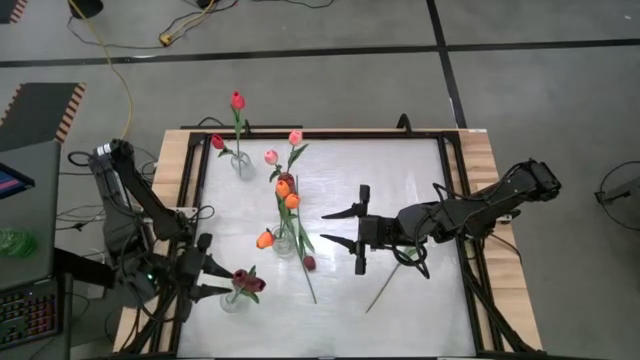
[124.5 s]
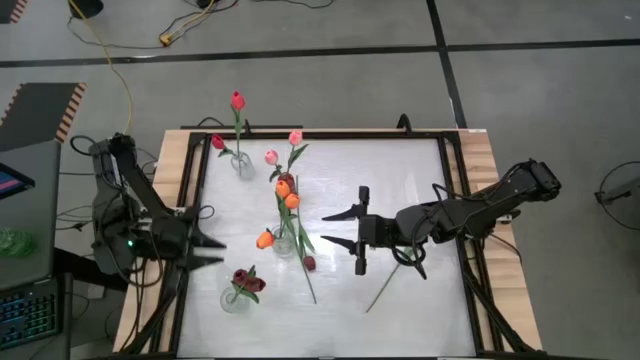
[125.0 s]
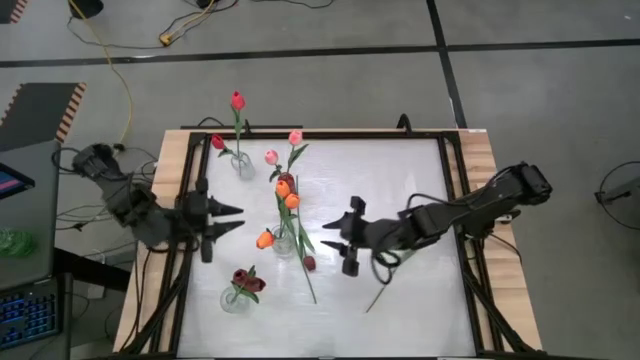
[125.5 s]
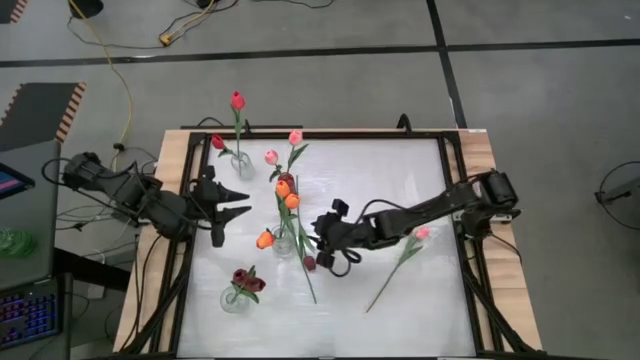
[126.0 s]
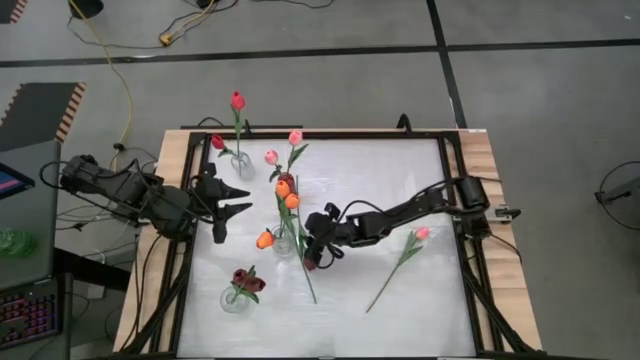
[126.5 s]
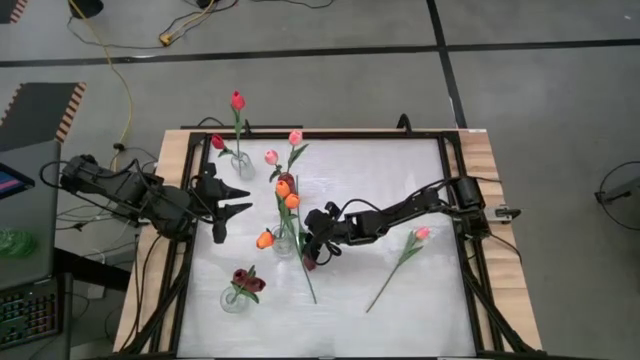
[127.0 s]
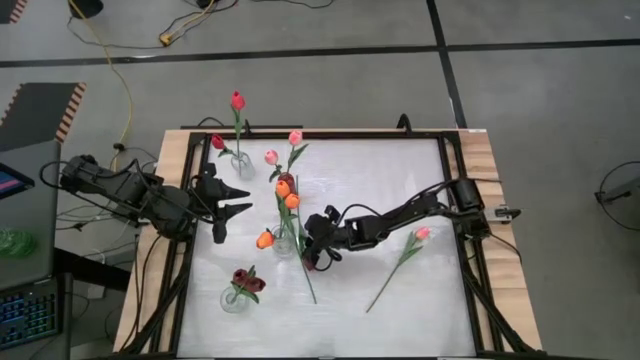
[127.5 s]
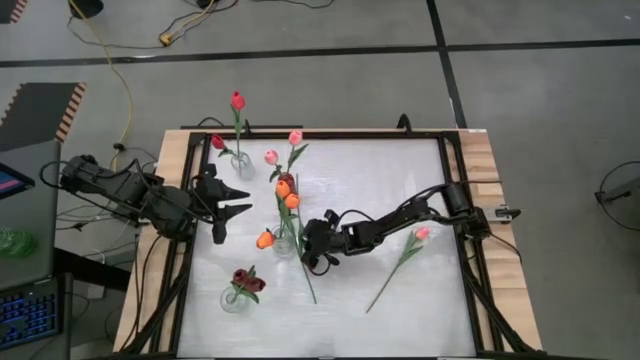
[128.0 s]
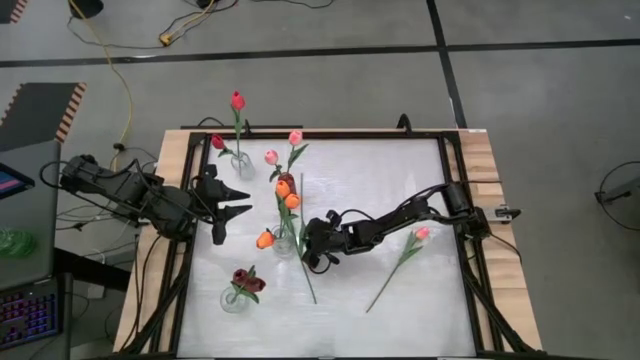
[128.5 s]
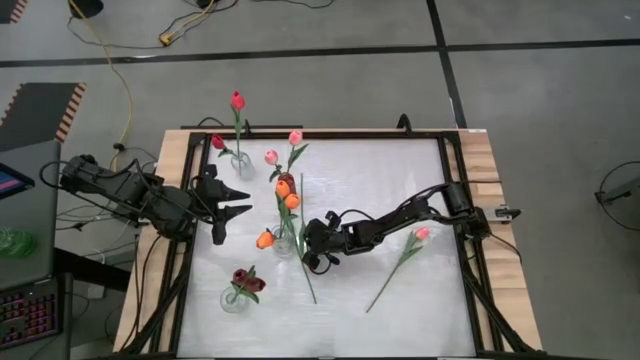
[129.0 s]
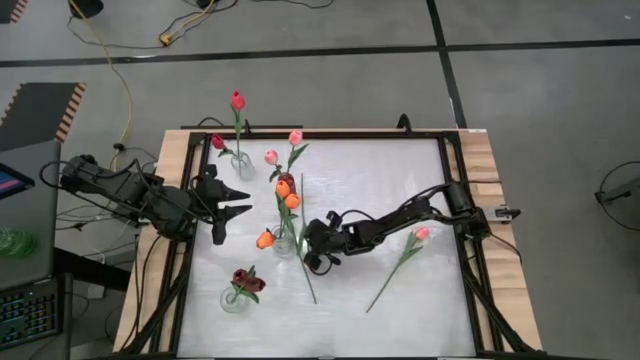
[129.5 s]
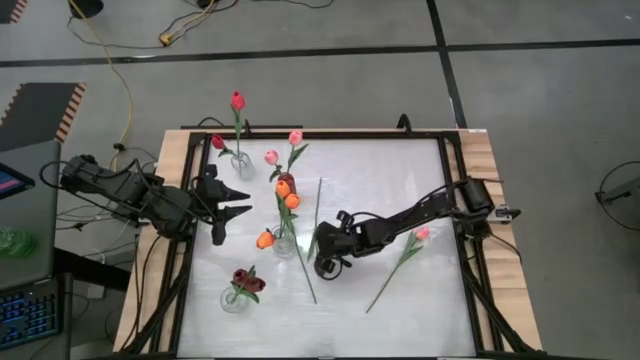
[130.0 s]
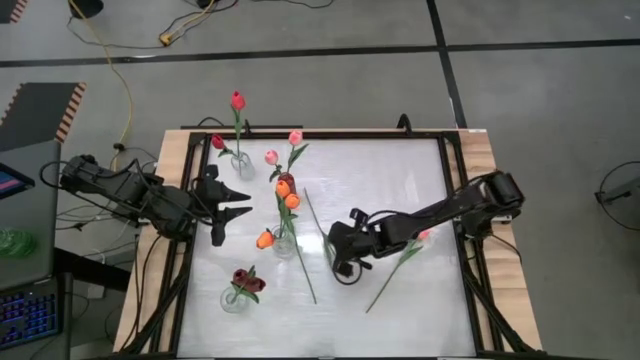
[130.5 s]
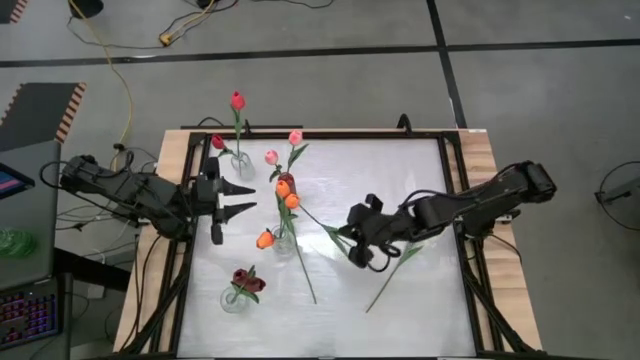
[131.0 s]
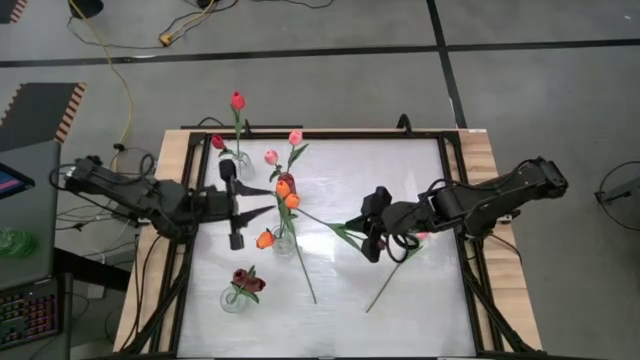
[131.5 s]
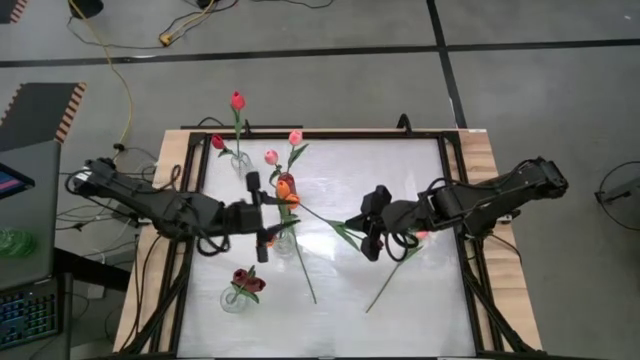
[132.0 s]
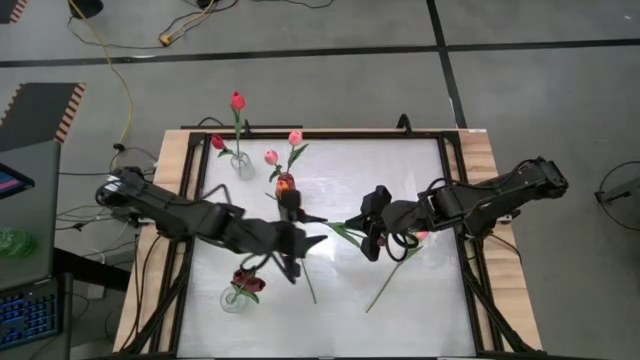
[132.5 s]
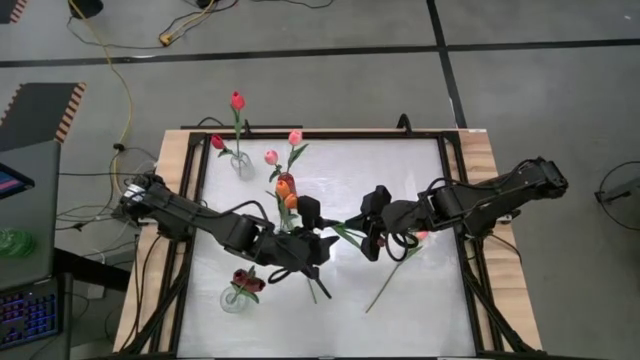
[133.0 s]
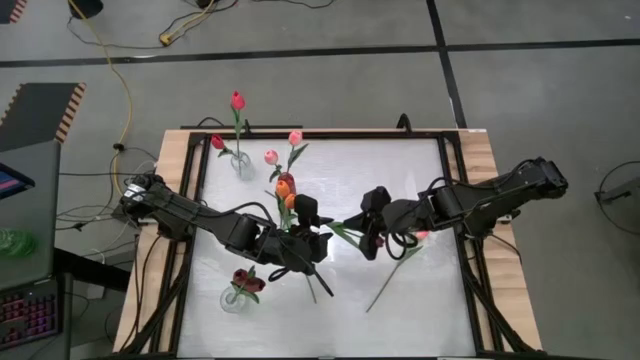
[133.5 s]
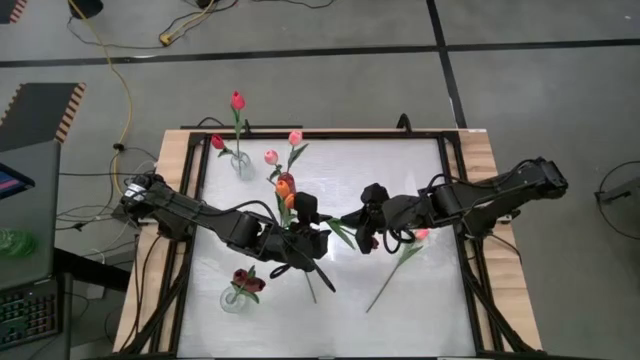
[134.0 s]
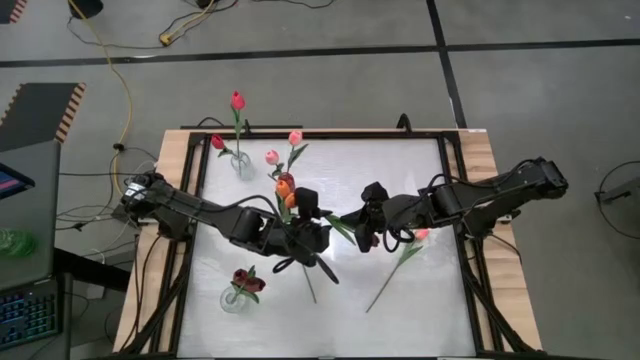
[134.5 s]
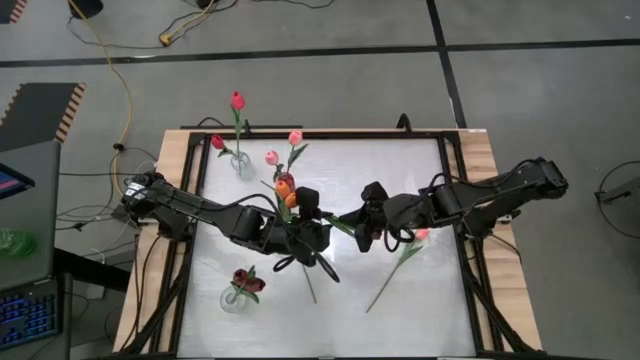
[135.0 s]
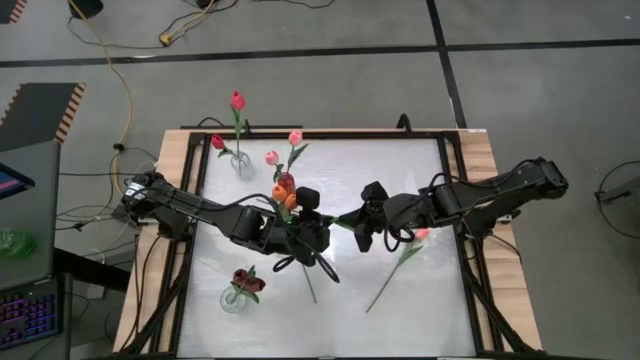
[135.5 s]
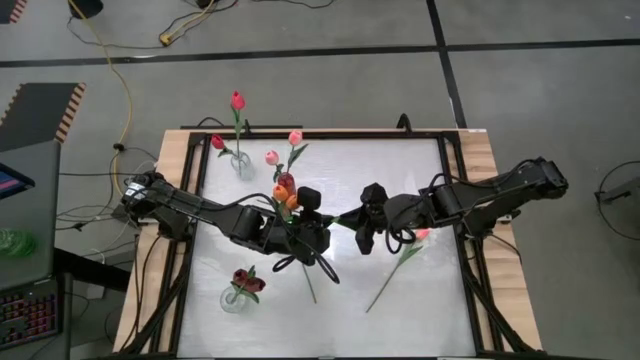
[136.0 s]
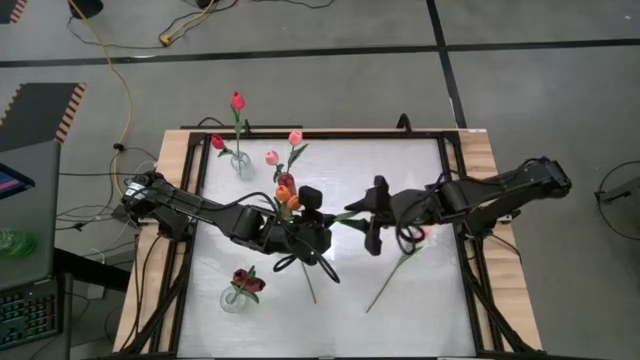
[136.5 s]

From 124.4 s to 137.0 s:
Task: Sort flowers into vase by color
Put the dark red tulip into the bottom transparent vase

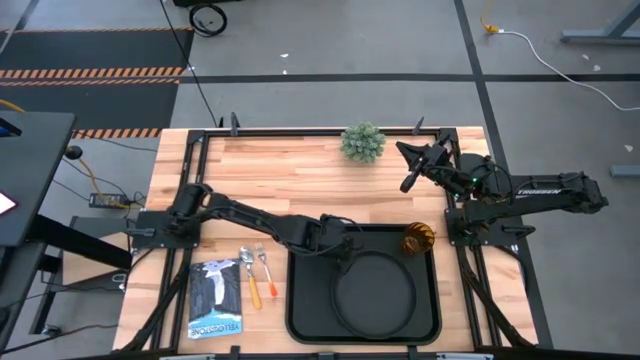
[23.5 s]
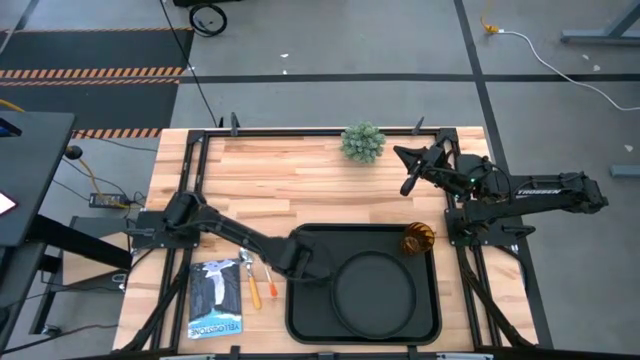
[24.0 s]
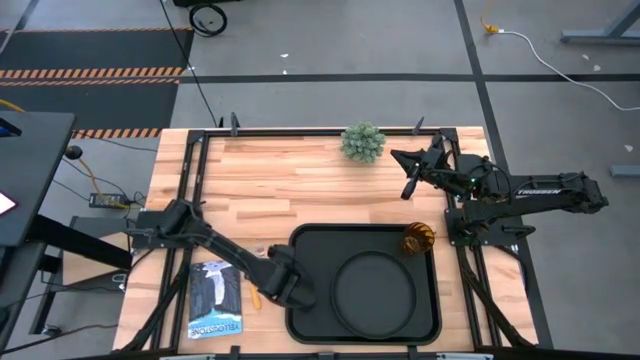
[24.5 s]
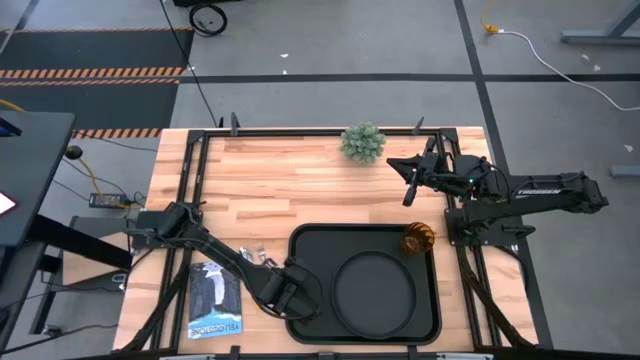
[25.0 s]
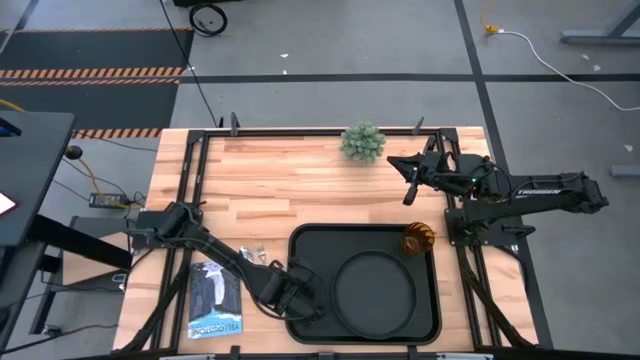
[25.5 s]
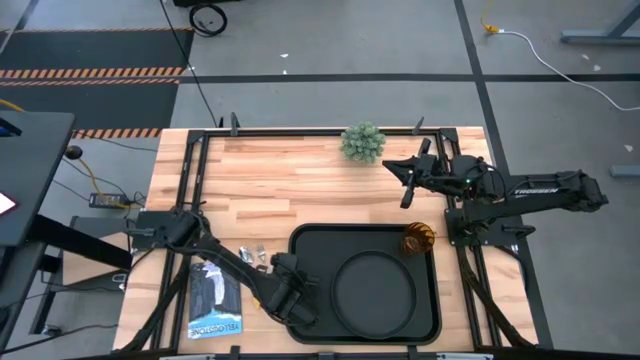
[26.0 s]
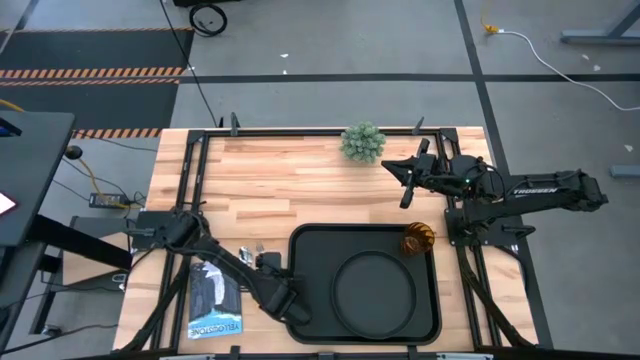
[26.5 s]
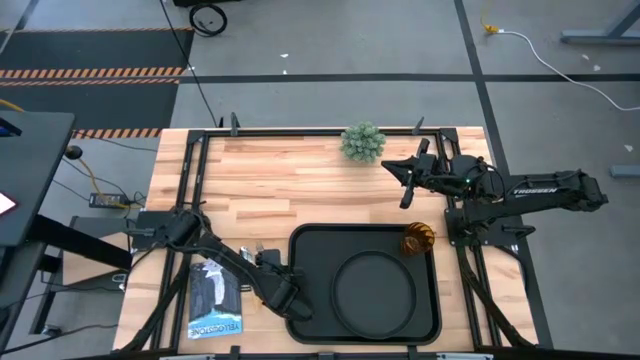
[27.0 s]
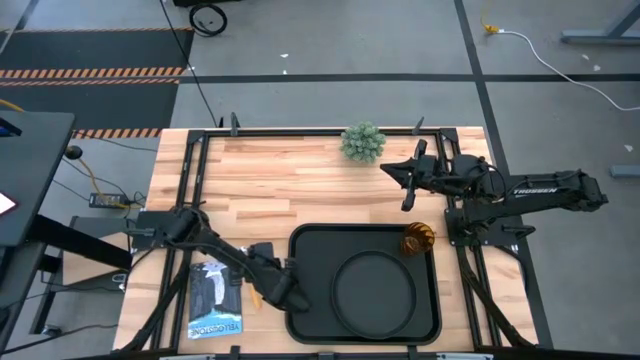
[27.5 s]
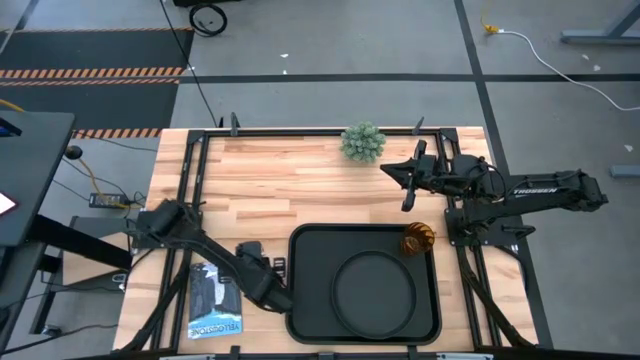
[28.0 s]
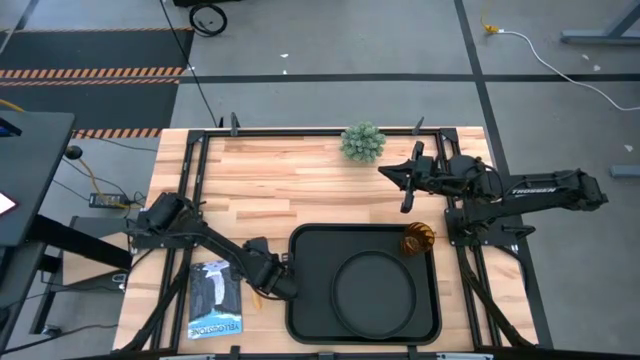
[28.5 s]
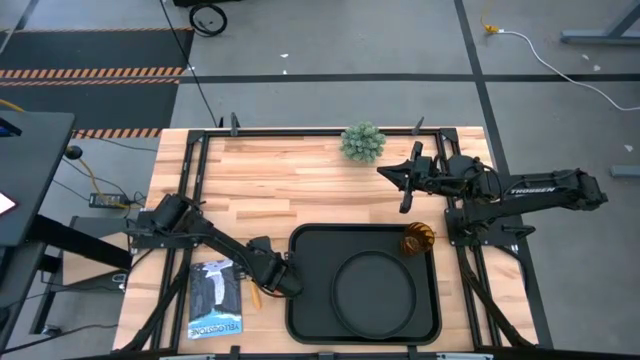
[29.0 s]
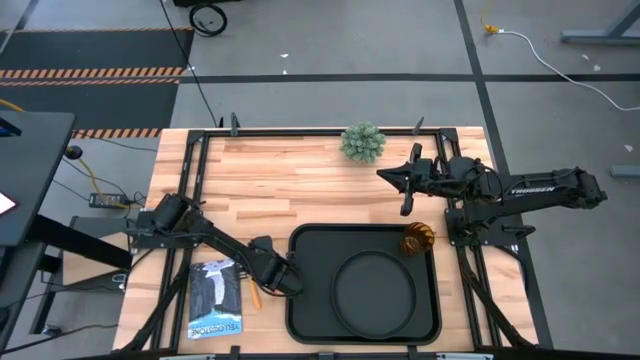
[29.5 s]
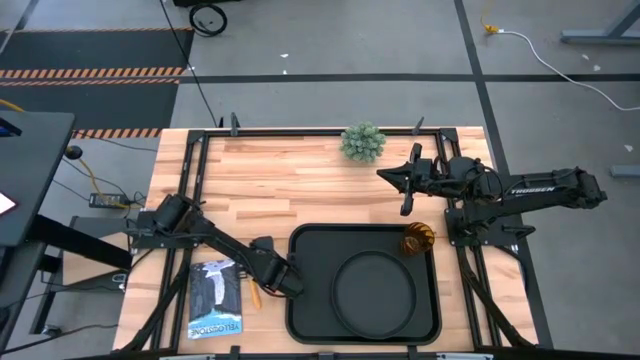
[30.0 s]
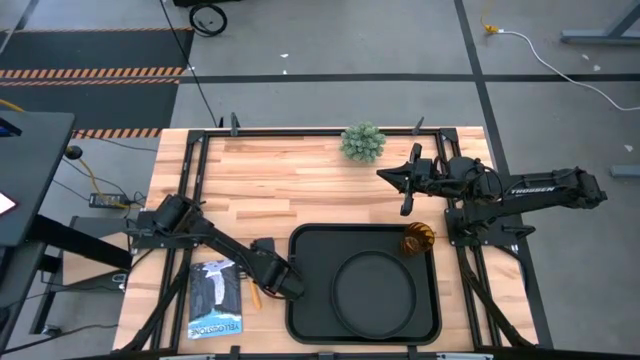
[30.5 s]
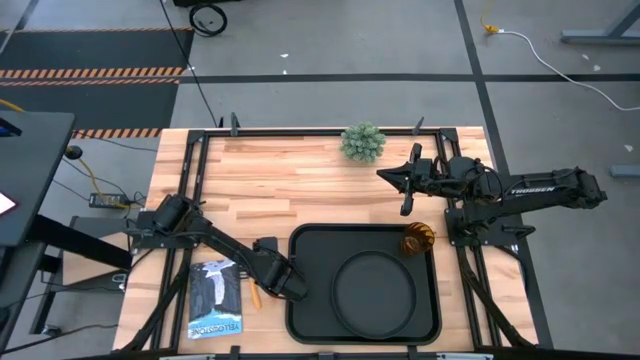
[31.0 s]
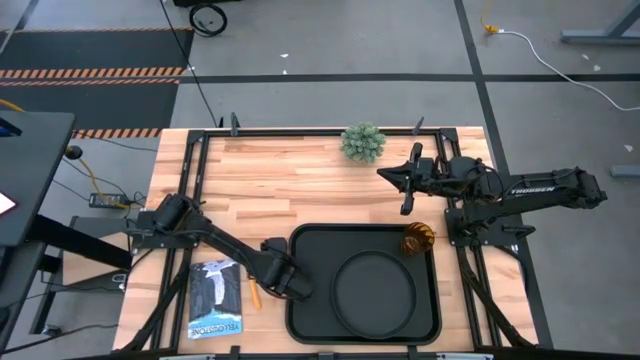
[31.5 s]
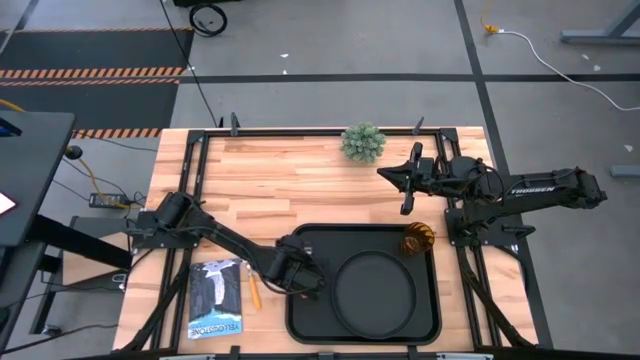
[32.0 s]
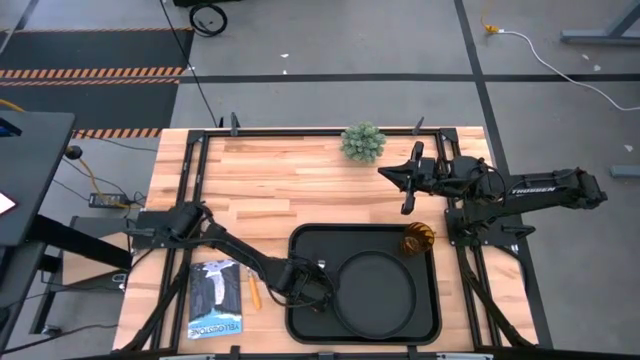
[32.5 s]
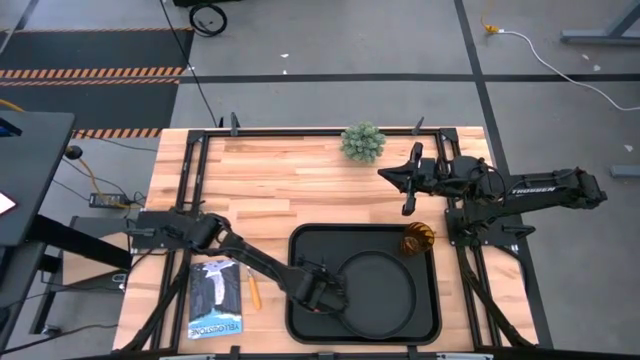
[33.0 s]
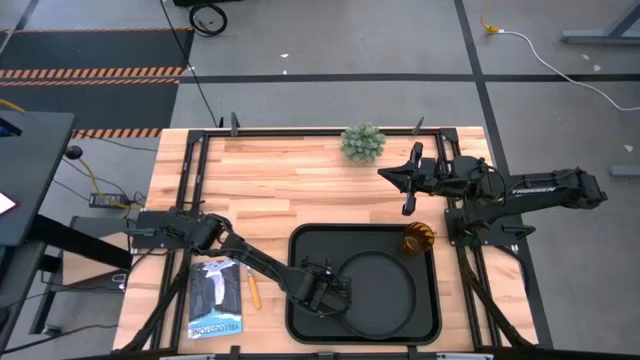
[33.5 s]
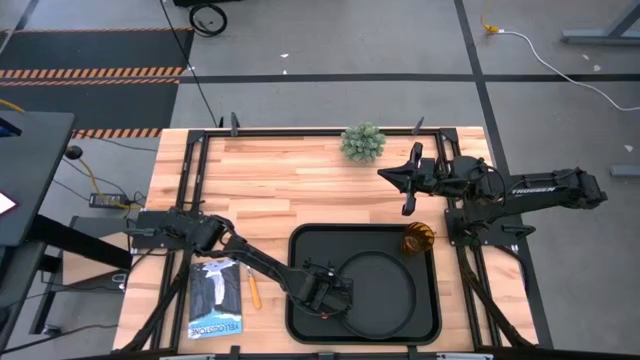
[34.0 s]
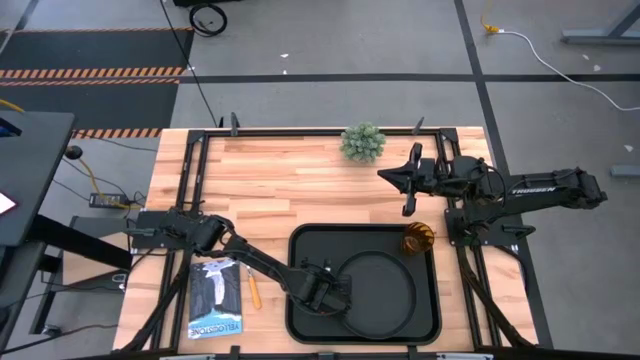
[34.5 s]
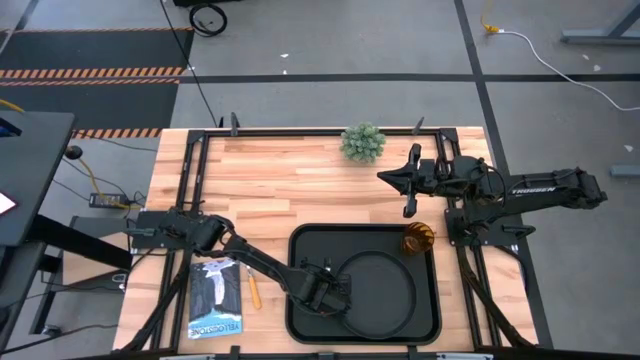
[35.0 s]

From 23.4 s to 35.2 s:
Task: Pick and place plate/cup/fork/spoon on tray
Put the orange fork on the black tray on the left of the black plate
